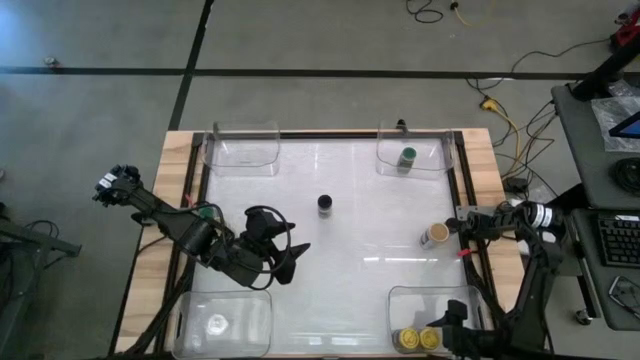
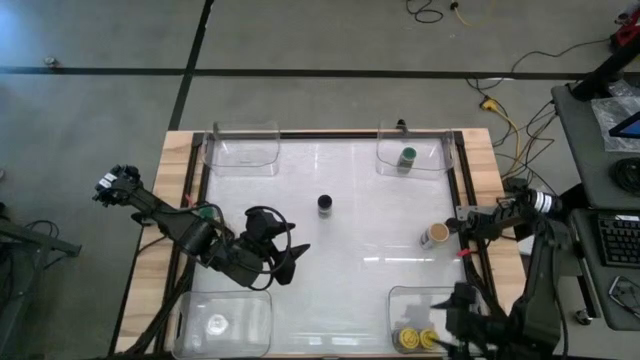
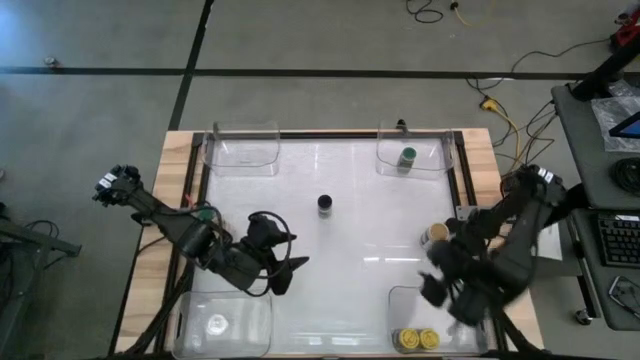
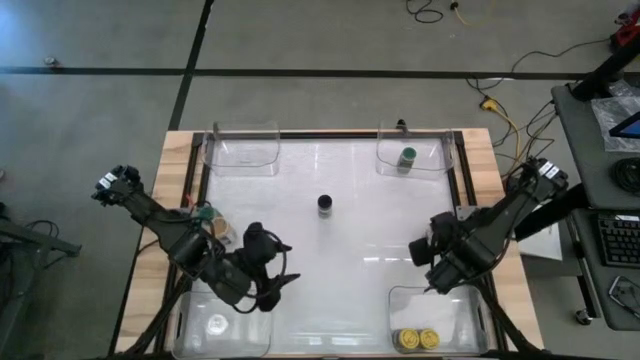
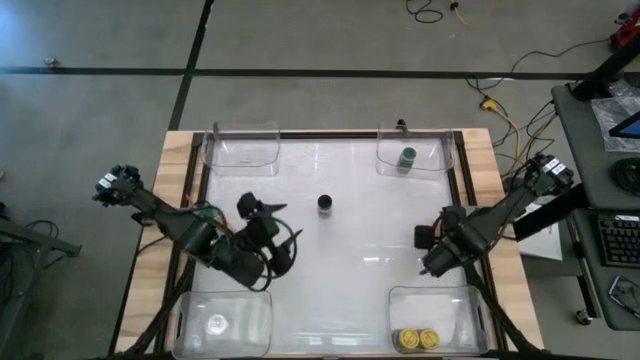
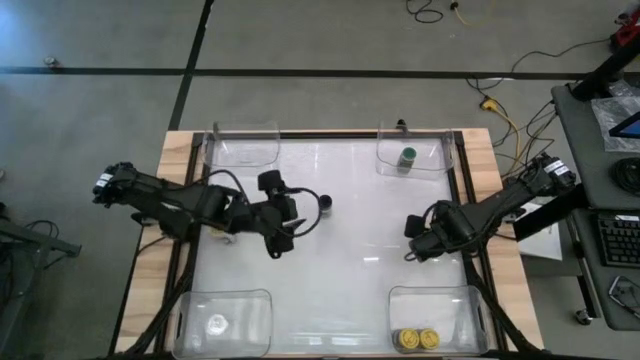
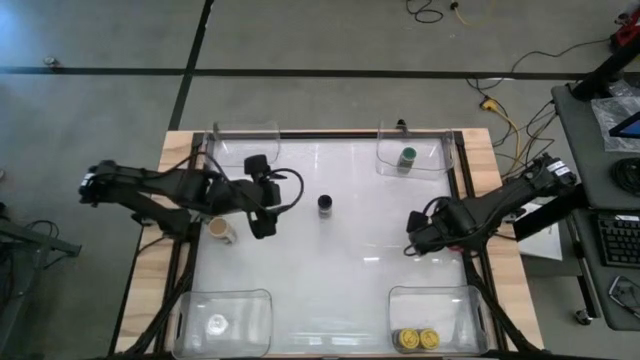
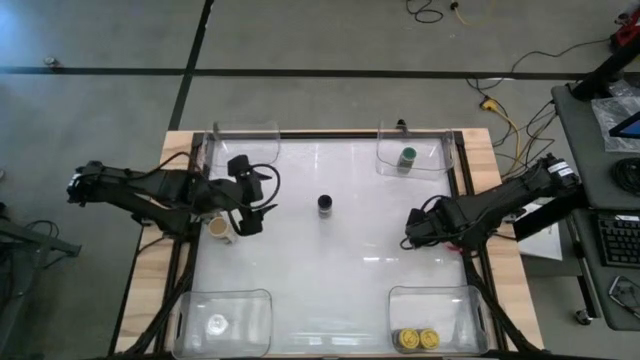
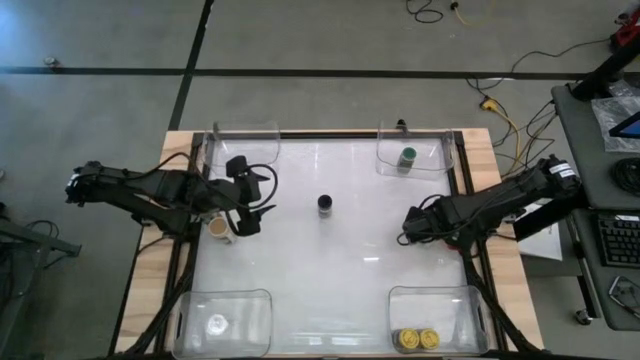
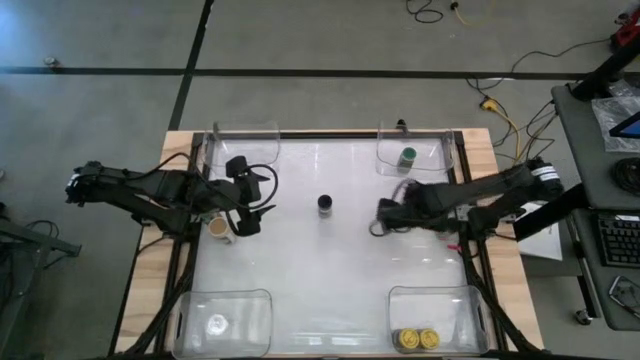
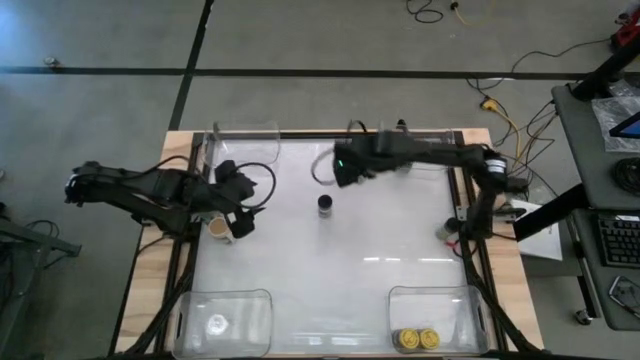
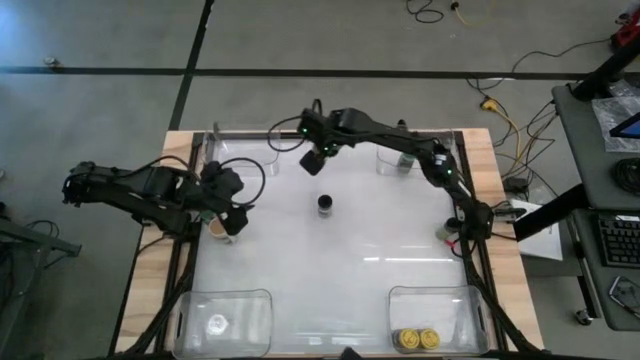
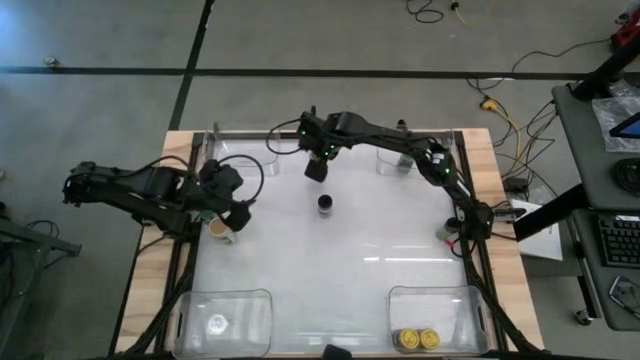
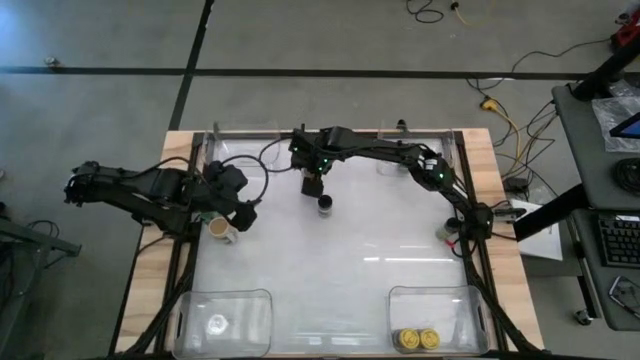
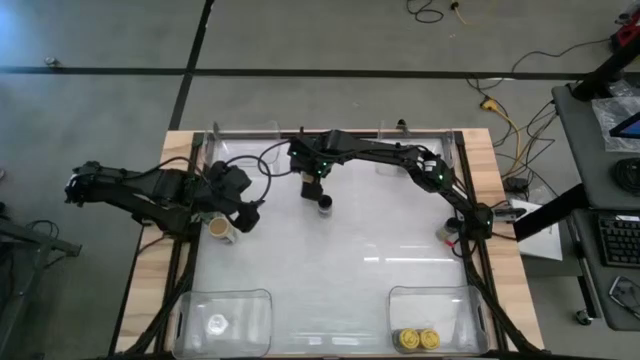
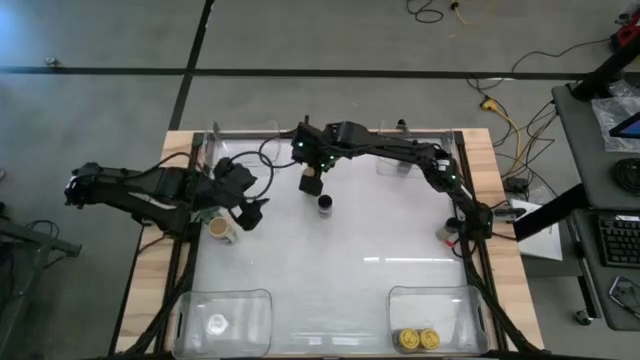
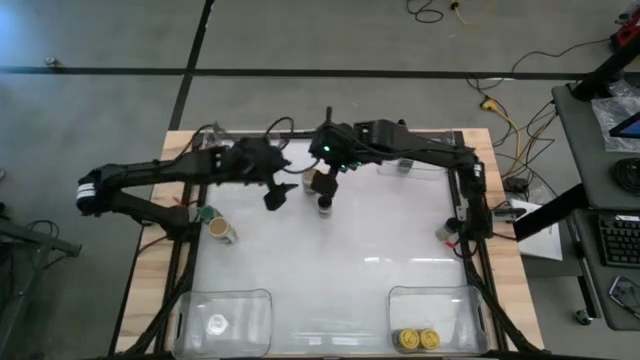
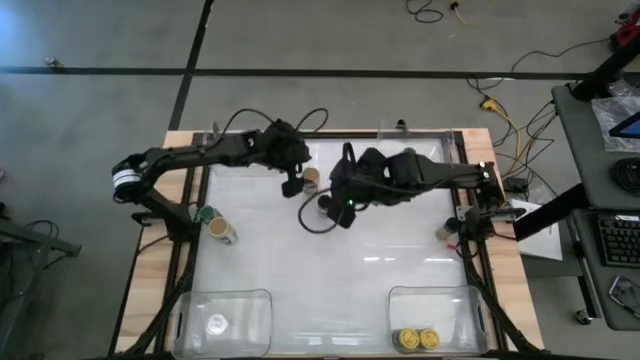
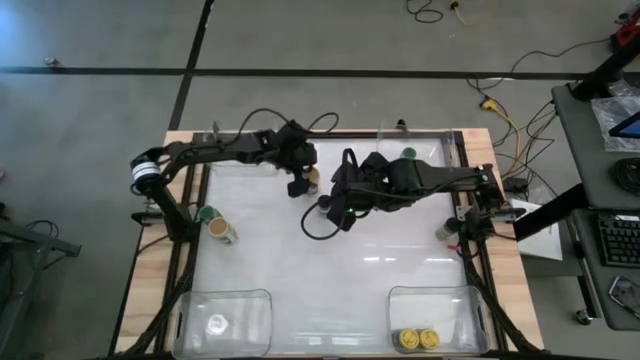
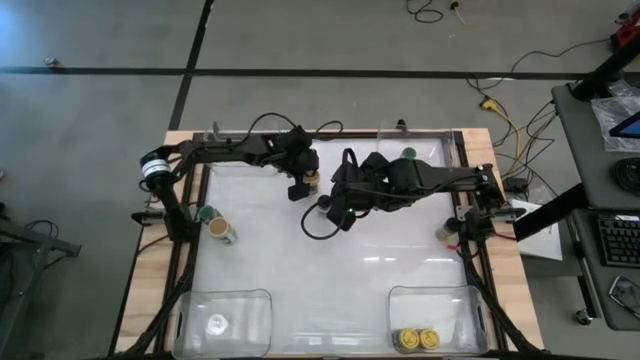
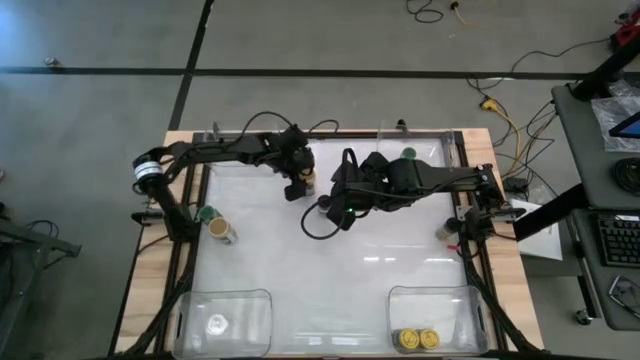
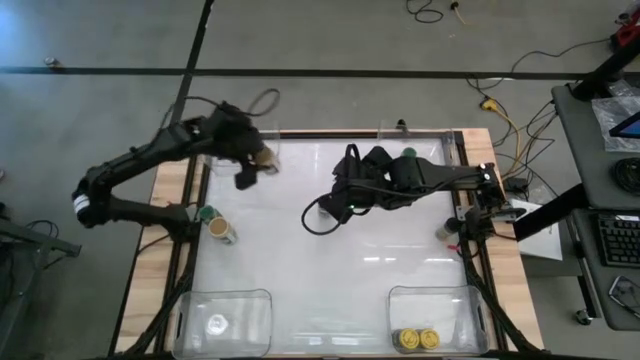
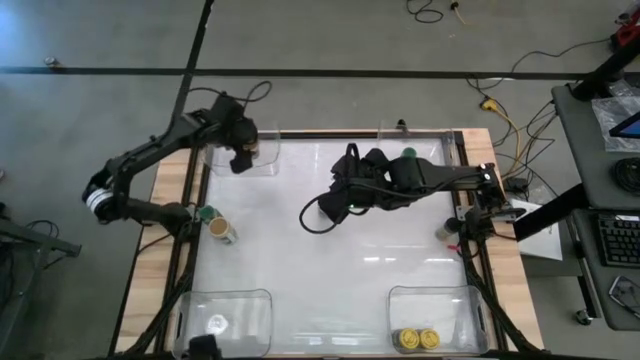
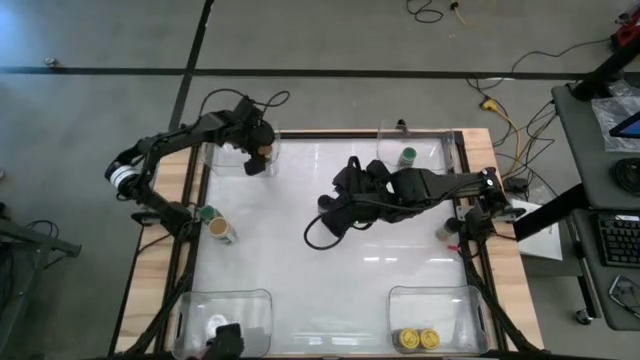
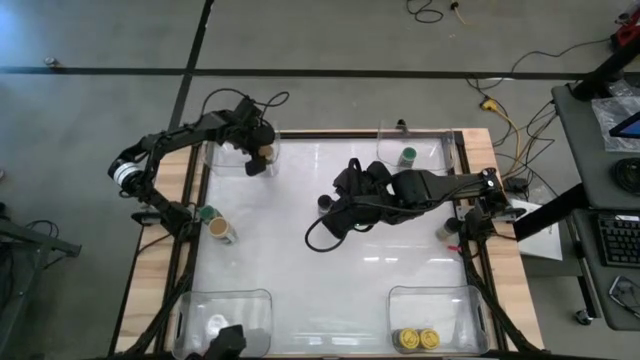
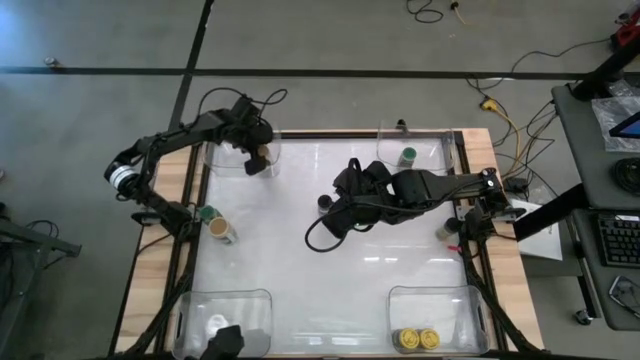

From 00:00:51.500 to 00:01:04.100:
Task: Sort spices by type
Put the right brown seasoning bottle into the top left transparent bin

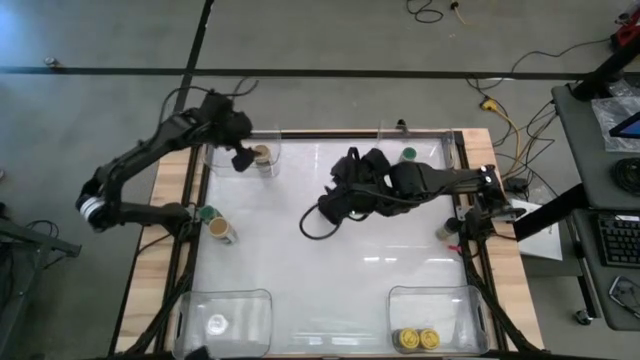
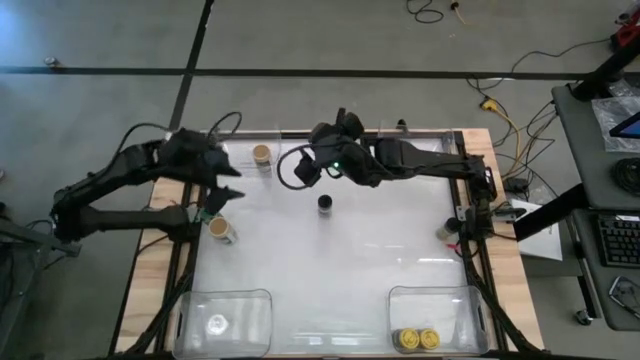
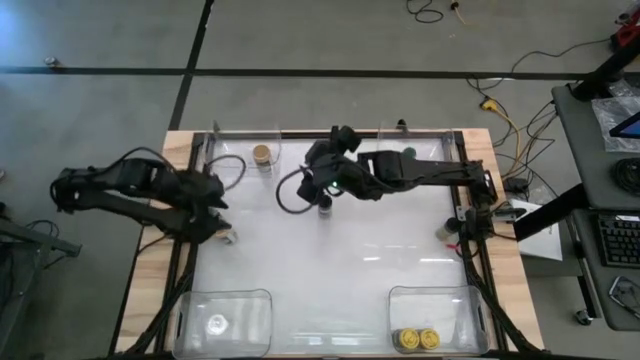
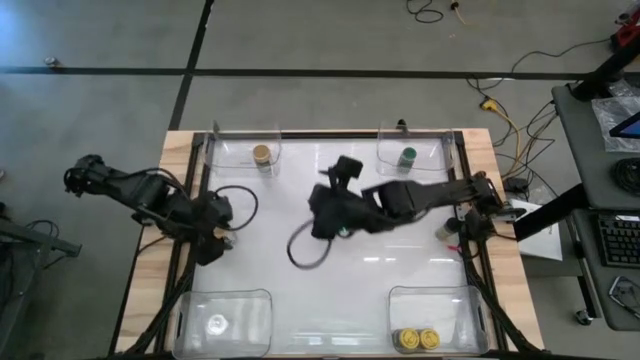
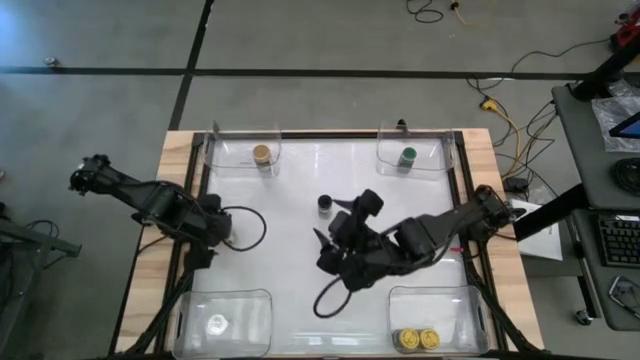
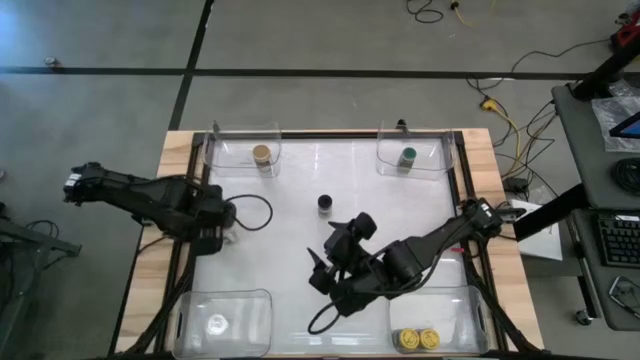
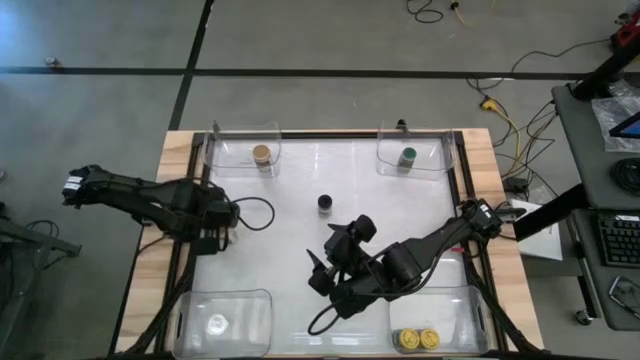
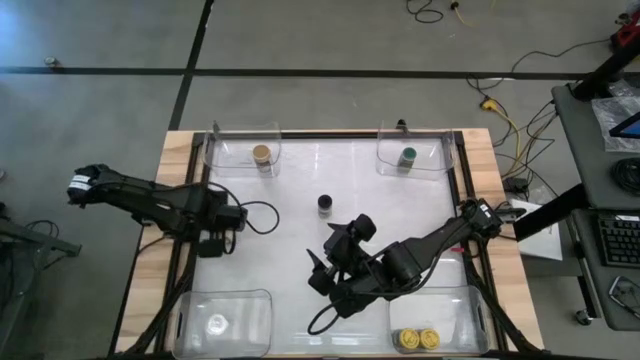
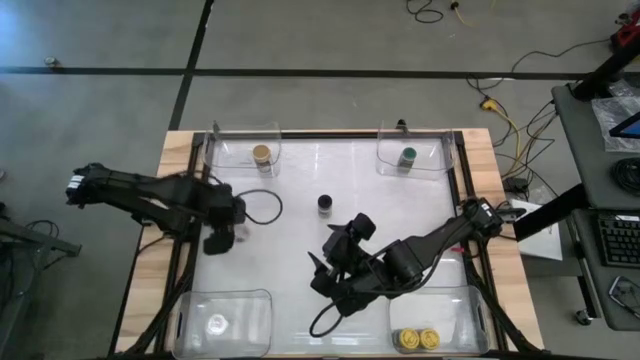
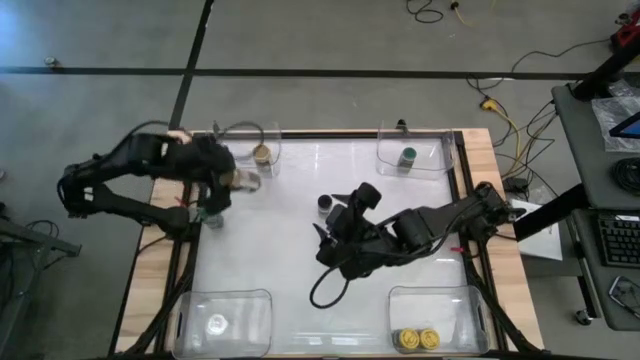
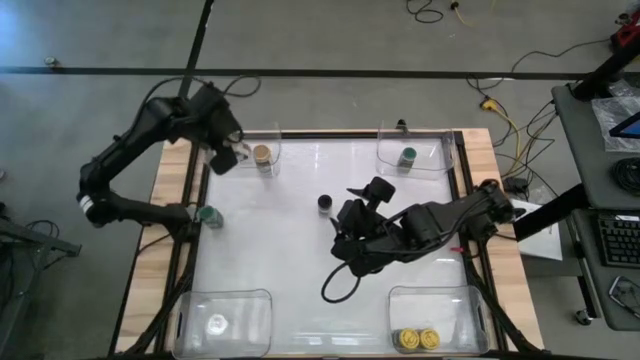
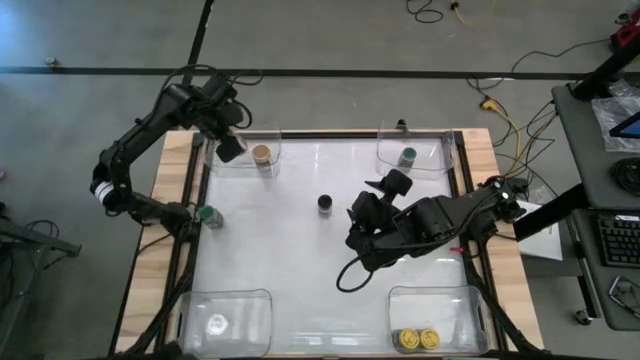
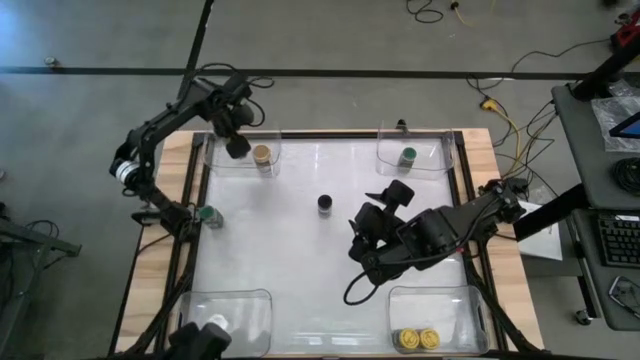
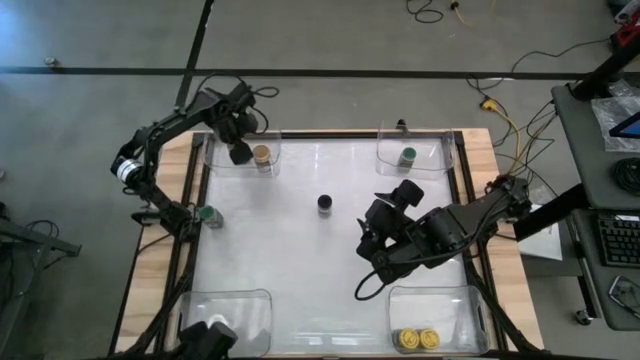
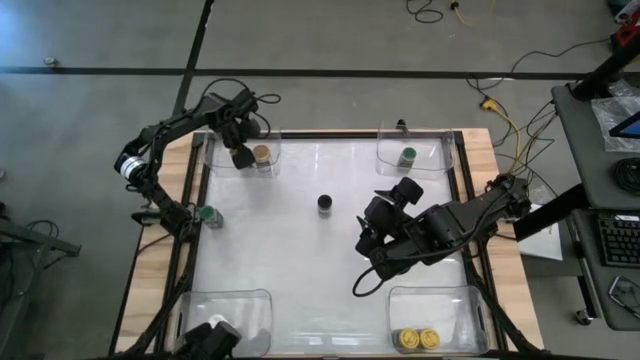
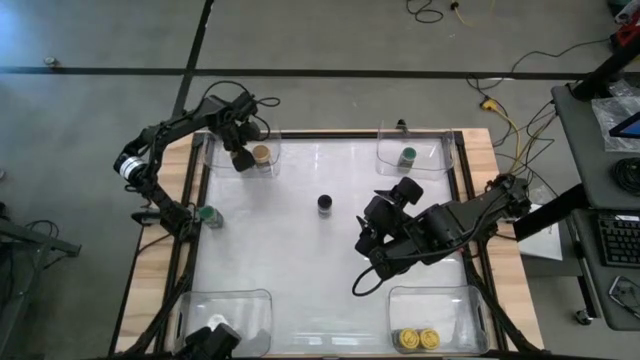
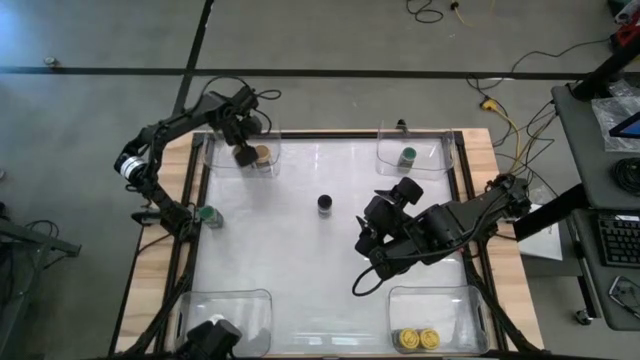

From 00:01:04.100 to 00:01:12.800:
Put the brown seasoning bottle into the top left transparent bin
